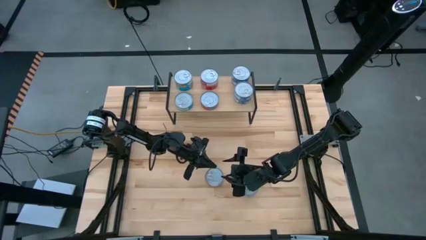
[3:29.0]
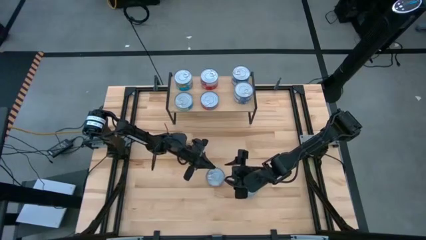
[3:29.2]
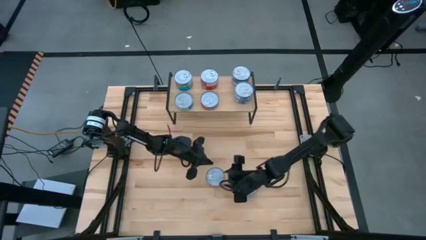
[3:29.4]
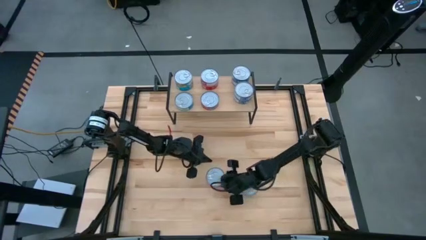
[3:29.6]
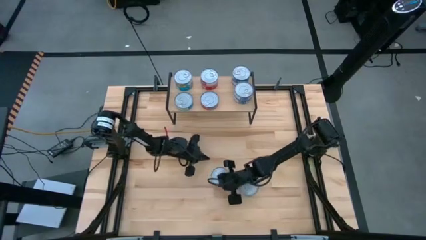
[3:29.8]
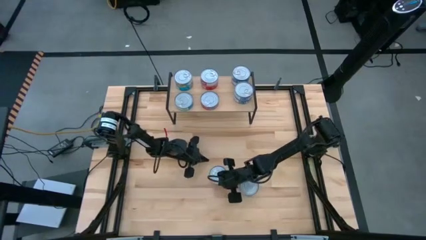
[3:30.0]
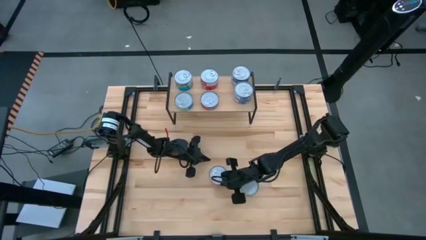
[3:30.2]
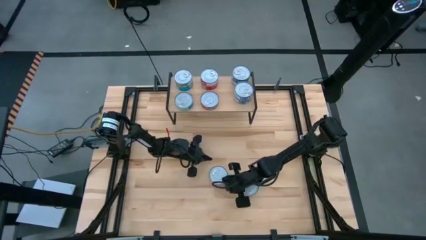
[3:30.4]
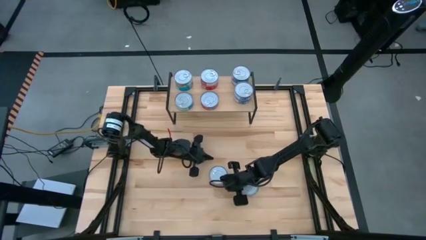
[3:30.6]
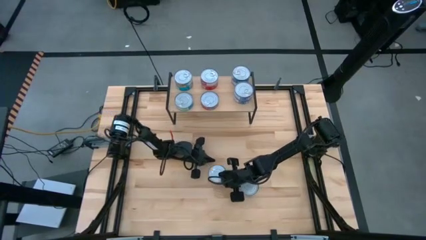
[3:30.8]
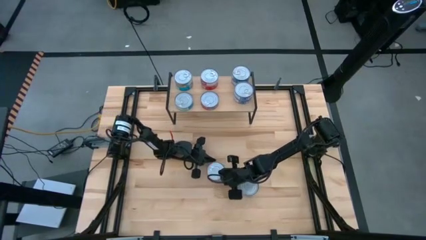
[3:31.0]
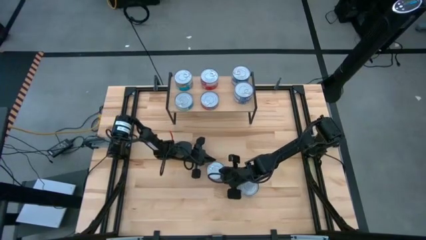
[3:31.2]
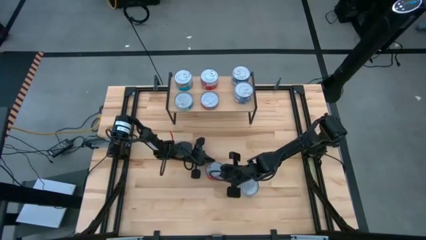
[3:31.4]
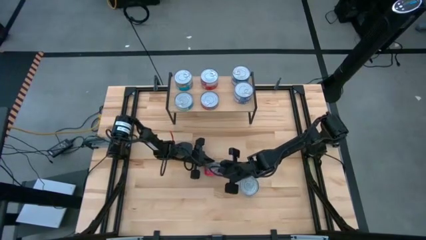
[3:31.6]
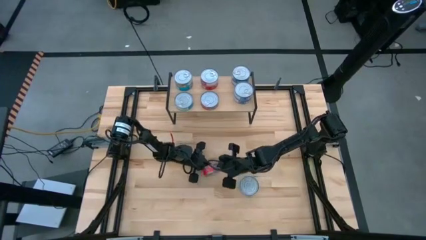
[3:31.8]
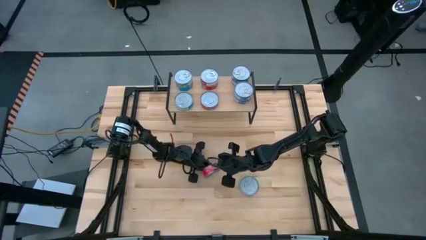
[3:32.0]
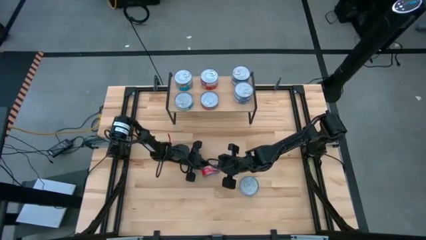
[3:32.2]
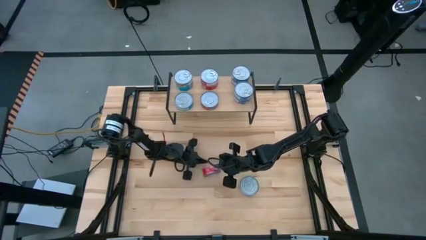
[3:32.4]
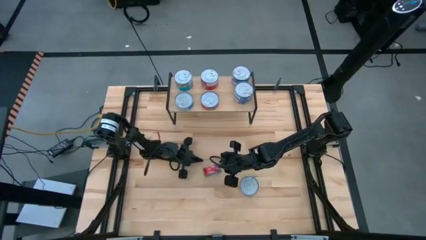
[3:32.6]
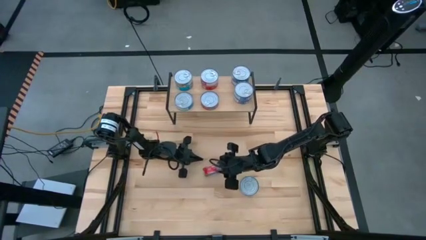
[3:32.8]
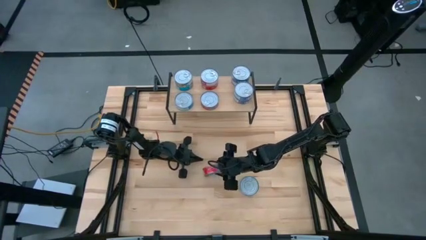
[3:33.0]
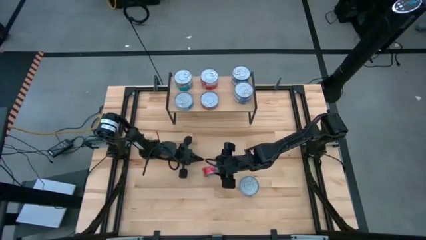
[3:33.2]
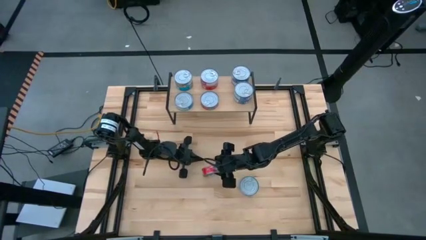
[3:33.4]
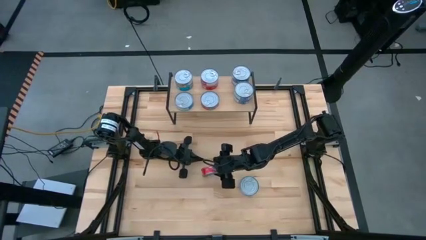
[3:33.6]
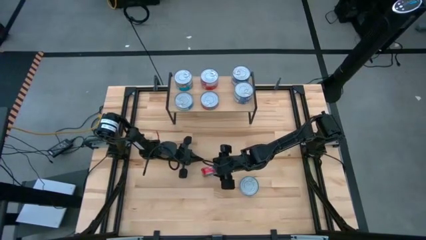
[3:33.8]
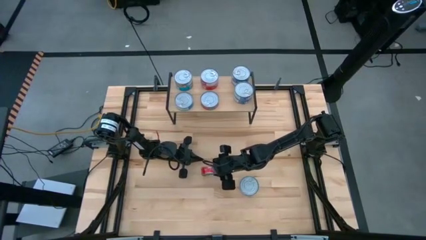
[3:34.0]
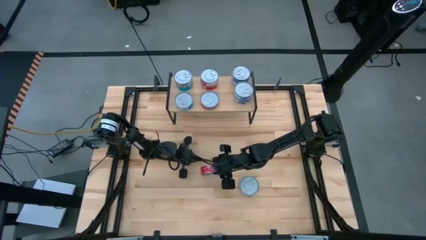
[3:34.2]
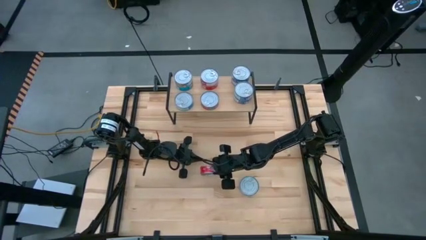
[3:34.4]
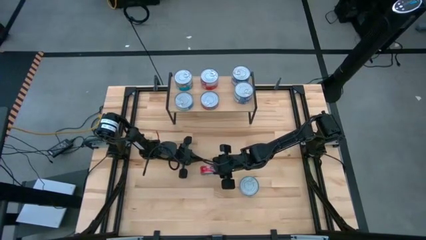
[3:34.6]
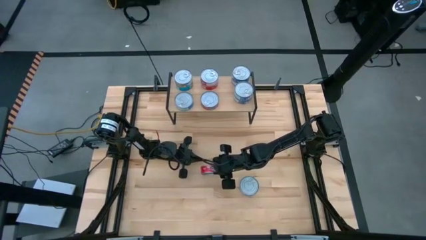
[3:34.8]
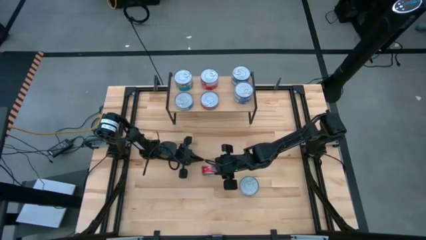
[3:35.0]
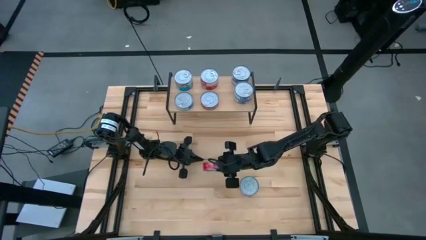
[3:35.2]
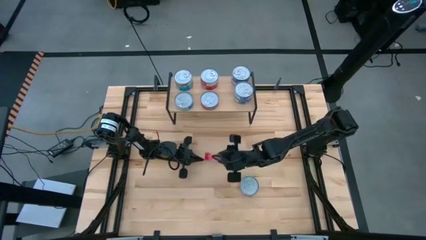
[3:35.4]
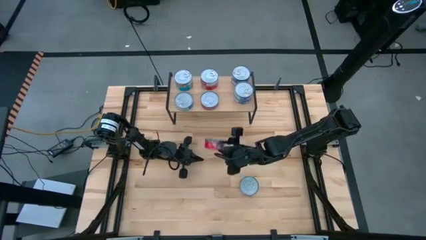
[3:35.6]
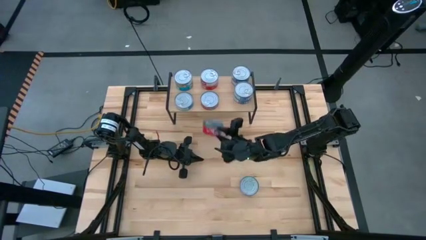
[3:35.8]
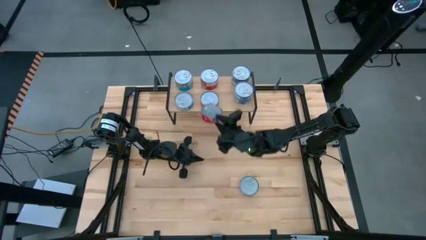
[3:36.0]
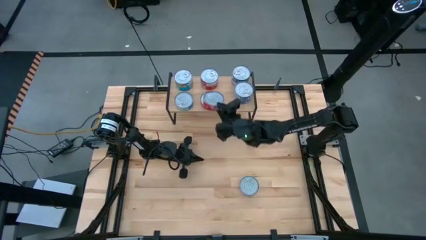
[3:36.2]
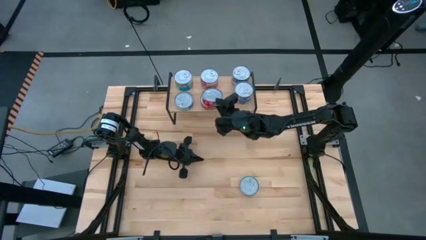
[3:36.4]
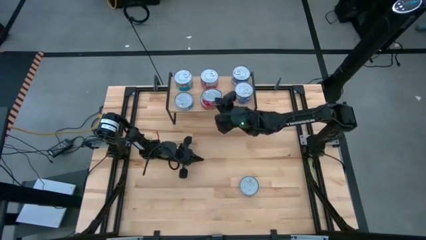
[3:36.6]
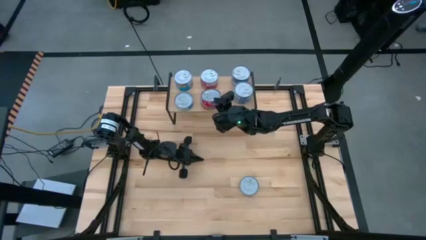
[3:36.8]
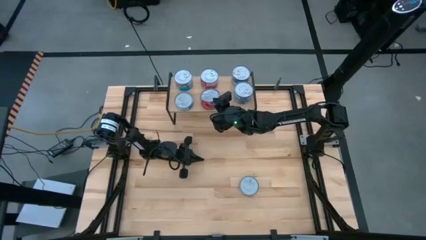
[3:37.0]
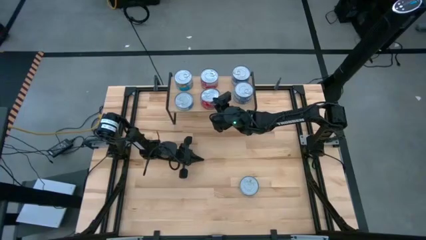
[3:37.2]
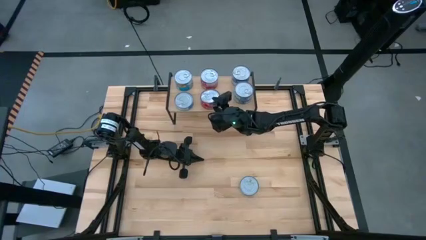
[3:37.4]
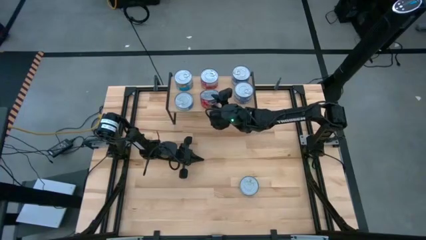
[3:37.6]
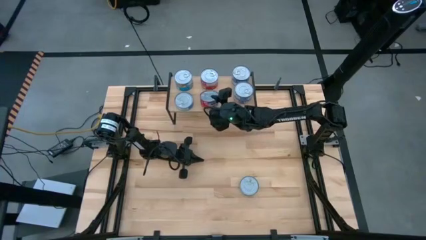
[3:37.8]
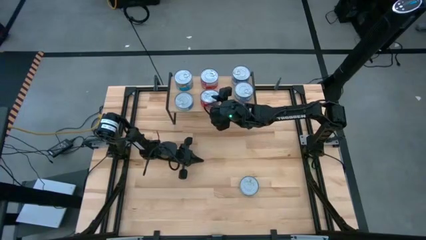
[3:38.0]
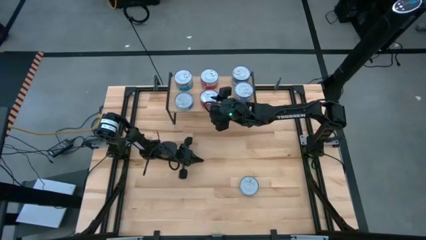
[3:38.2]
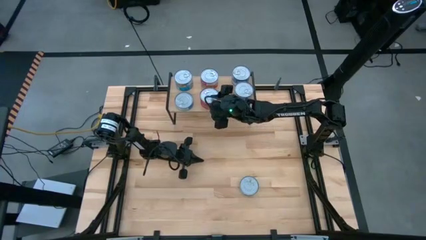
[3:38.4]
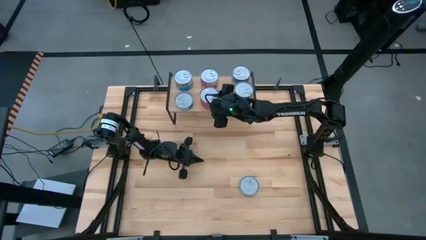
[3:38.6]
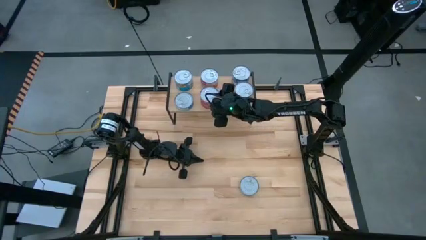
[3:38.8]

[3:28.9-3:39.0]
Task: Stack canned seafood by type on shelf
Stack the red tuna can on top of the other red tuna can on the shelf

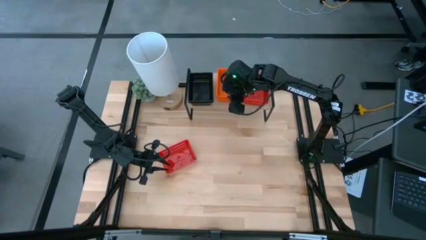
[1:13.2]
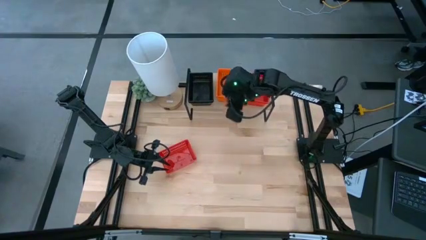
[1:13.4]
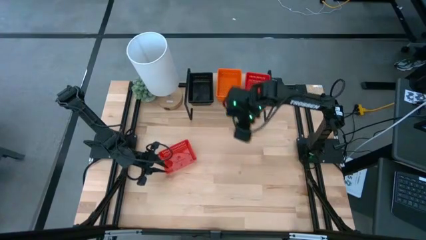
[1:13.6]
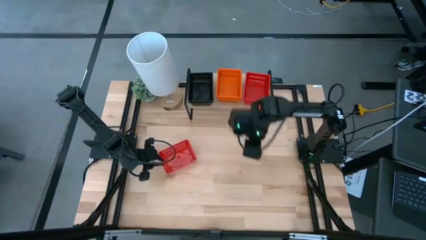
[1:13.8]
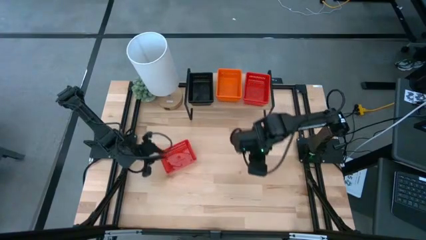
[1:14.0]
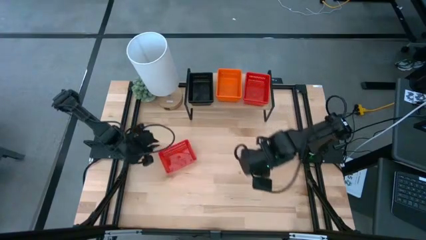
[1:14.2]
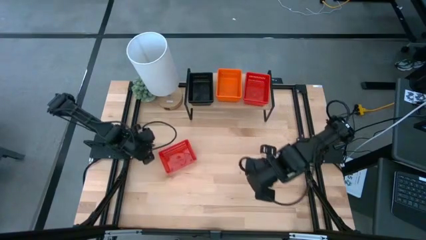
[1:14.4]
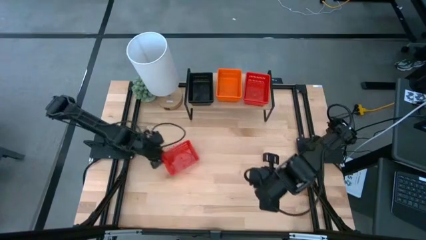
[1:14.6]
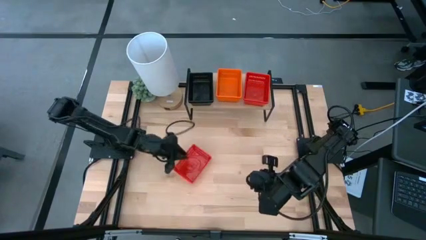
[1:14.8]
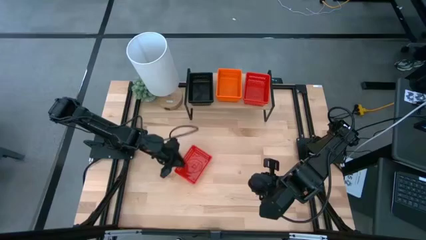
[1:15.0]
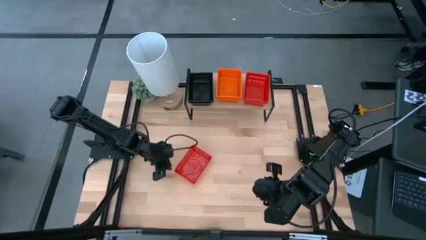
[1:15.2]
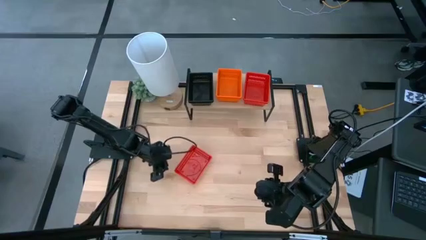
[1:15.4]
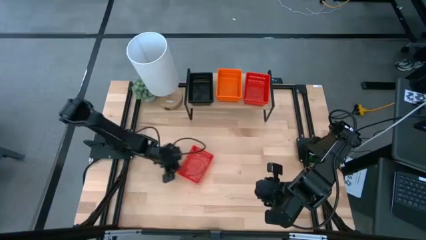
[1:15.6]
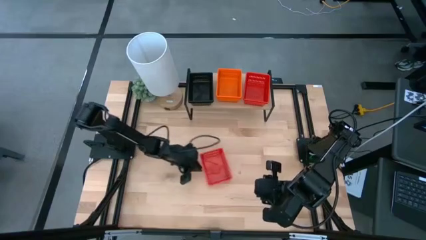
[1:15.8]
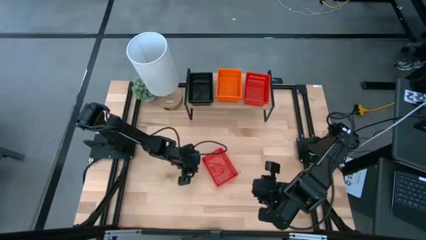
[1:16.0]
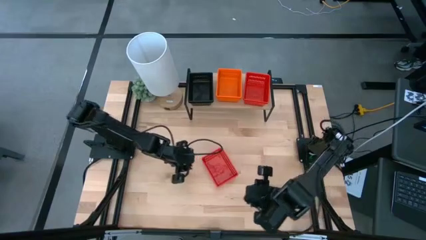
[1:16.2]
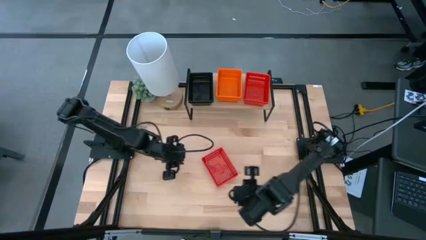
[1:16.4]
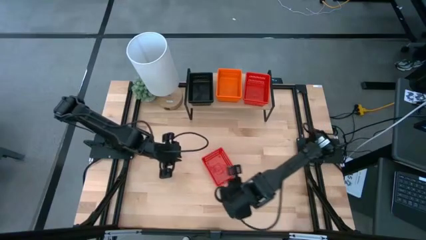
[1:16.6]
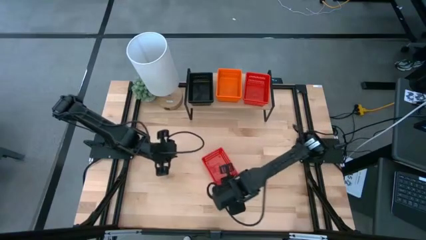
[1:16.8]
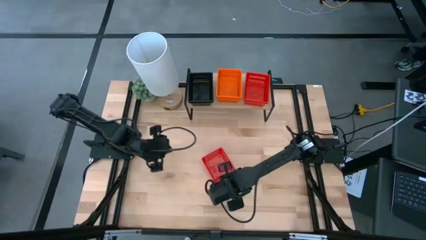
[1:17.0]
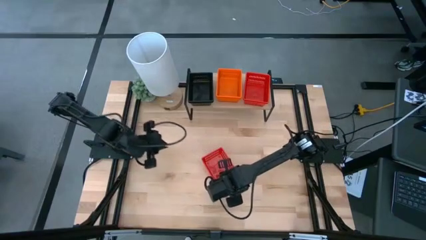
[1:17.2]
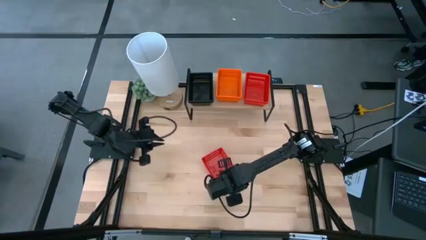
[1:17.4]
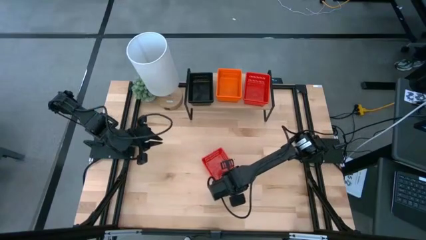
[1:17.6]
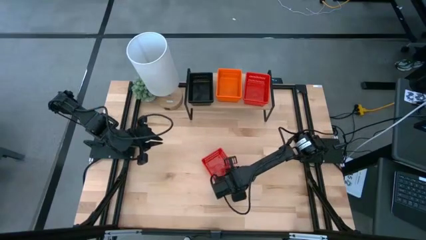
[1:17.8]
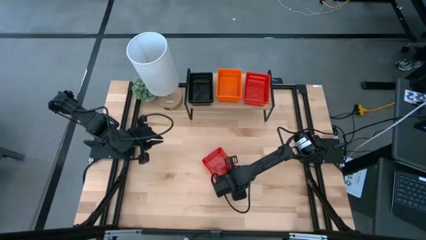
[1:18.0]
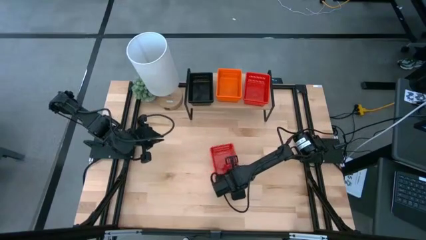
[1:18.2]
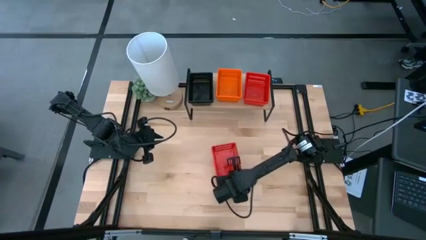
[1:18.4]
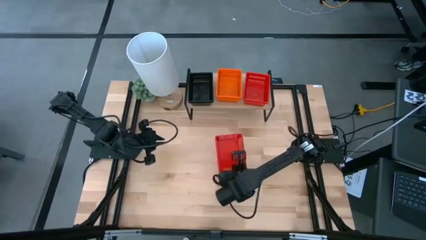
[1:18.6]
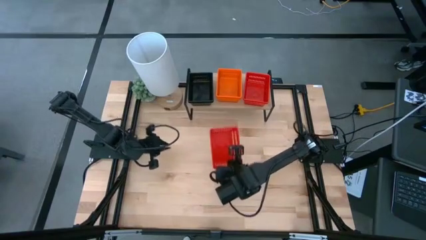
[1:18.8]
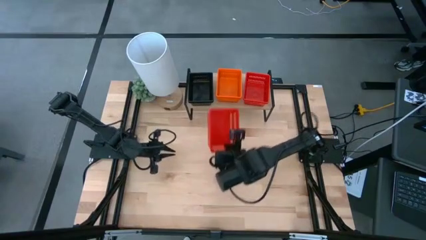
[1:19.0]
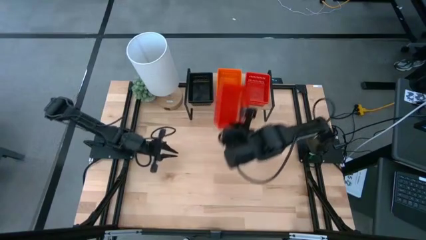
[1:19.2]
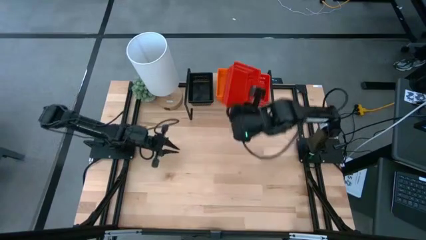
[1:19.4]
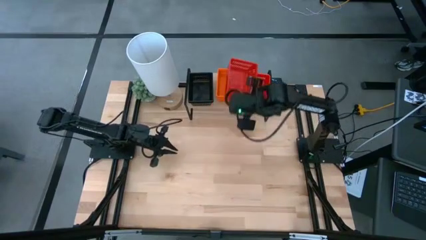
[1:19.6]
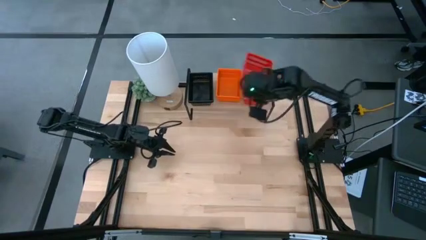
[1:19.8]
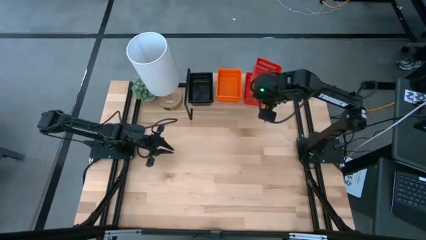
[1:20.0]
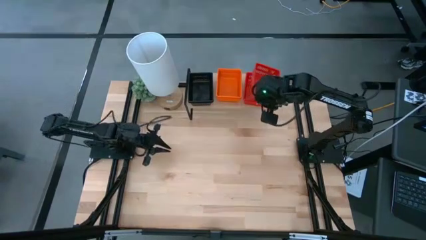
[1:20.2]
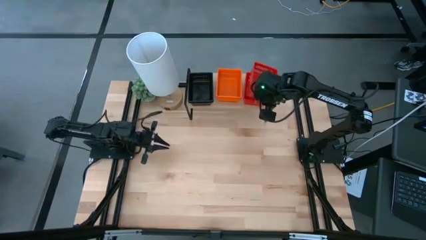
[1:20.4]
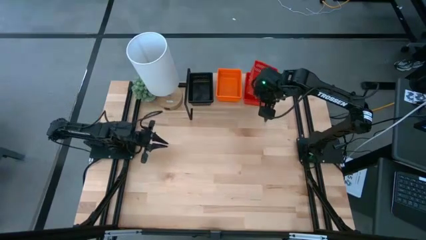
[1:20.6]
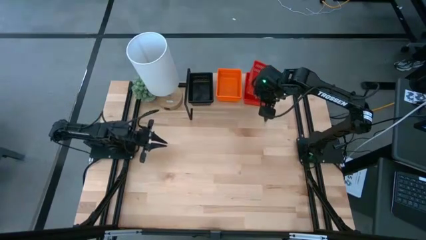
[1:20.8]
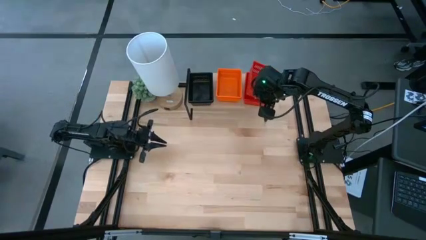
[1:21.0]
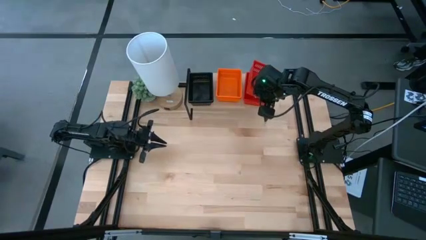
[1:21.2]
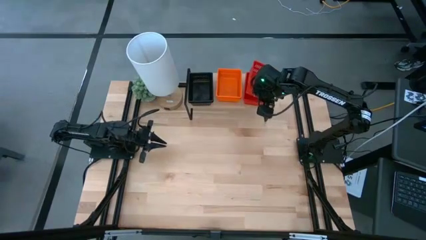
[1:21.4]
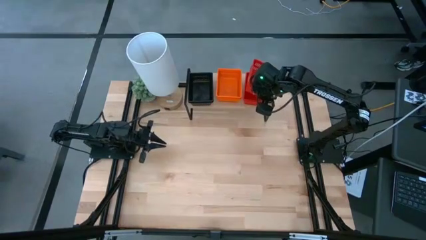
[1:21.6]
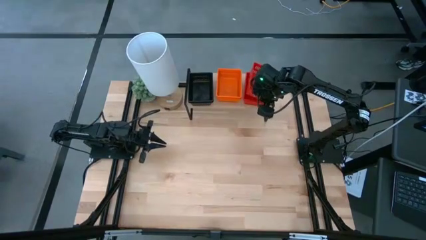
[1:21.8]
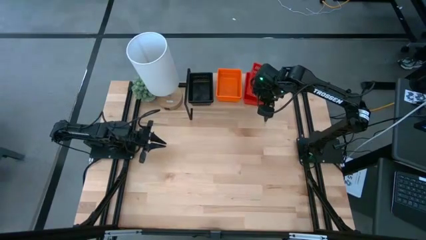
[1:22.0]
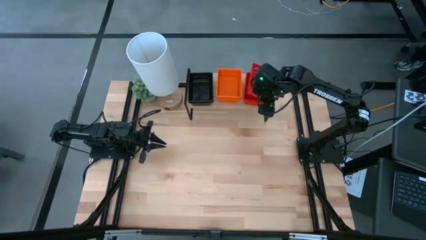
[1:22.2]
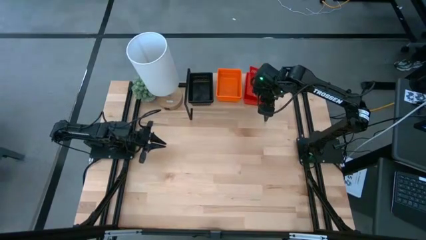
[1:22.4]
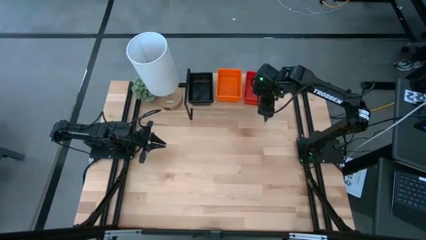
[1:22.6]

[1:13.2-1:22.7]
Task: Stack baskets on shelf by color
Stack the red bin on top of the stacked red bins on the shelf
